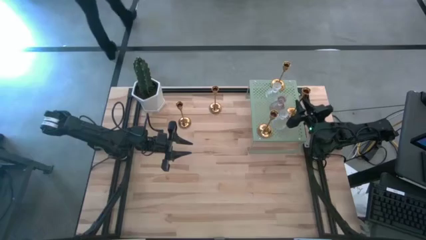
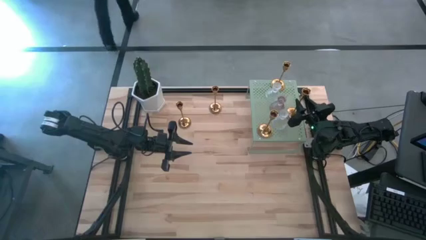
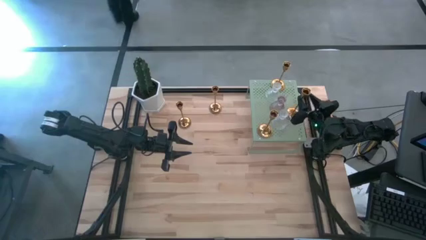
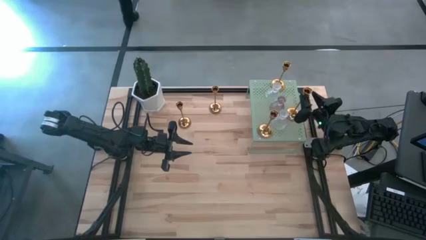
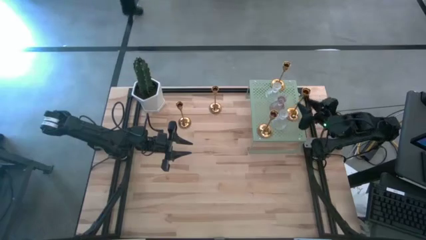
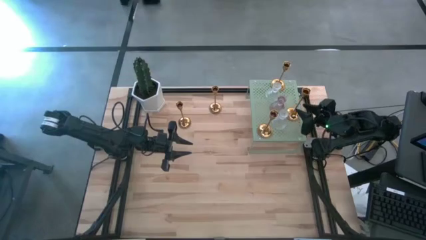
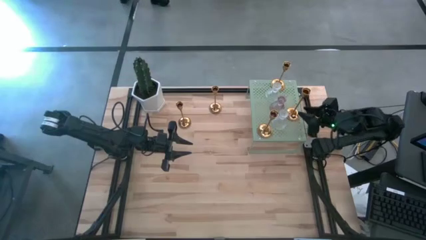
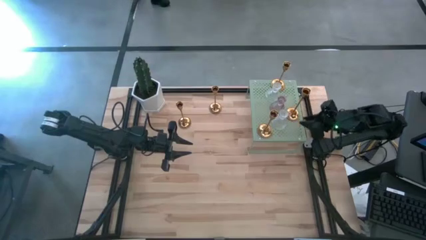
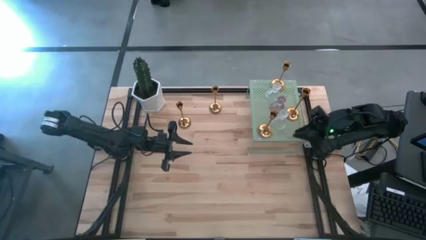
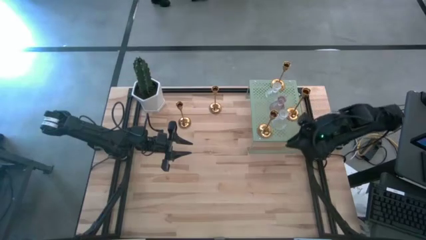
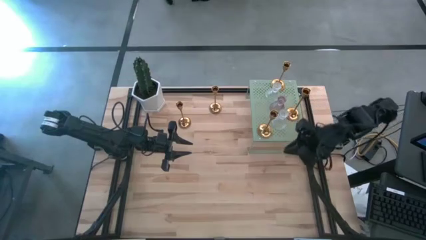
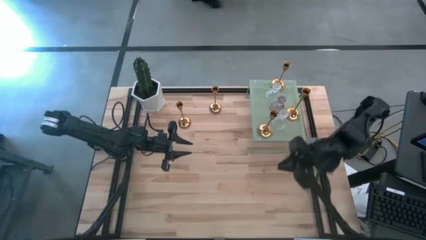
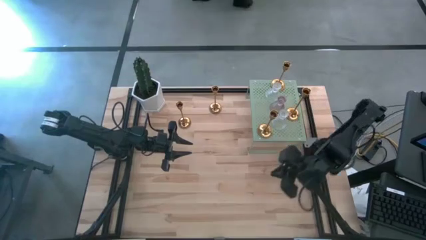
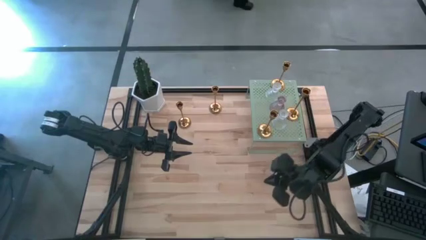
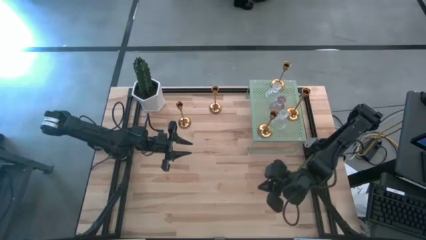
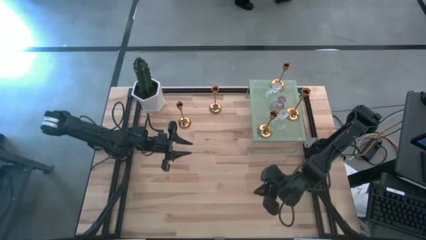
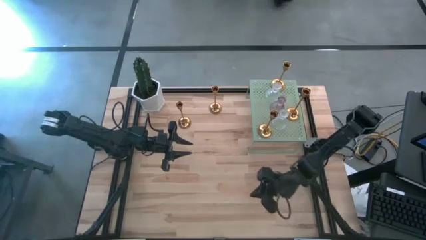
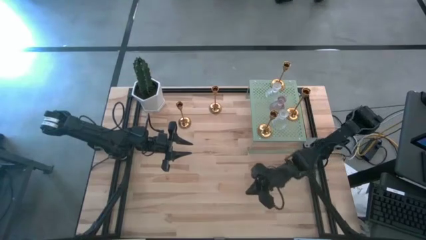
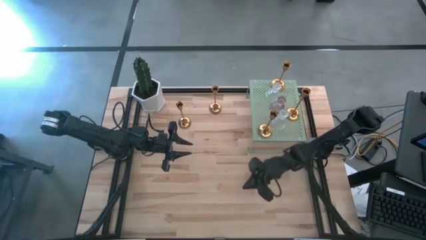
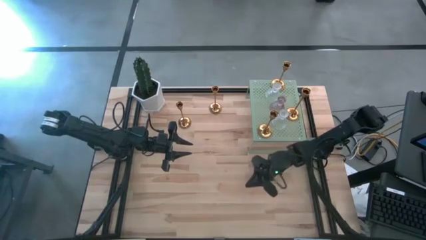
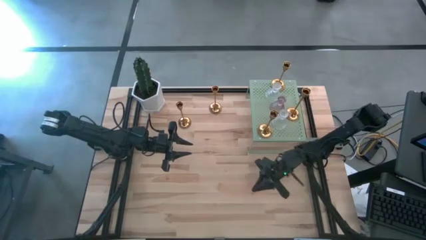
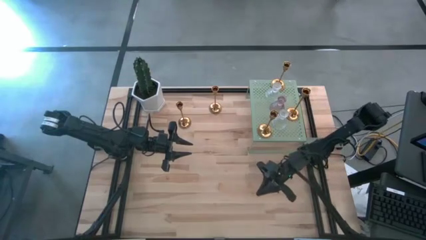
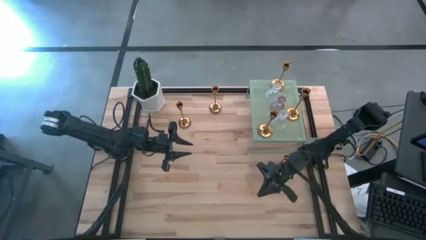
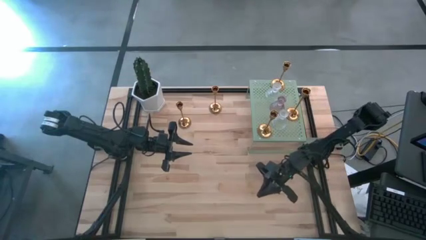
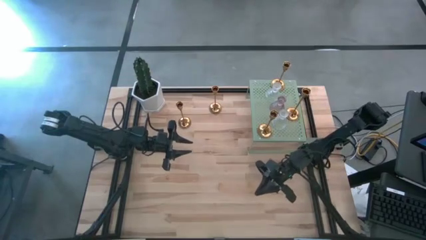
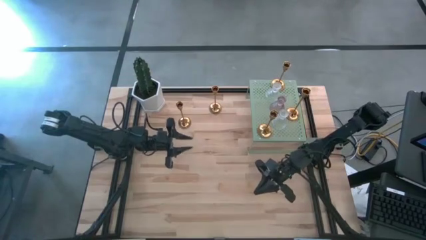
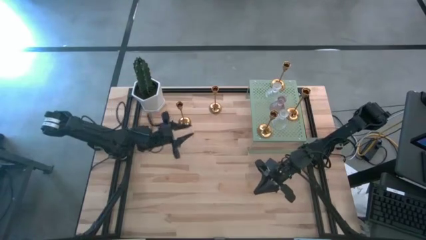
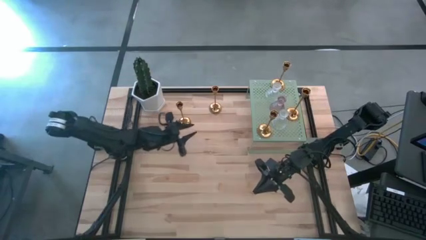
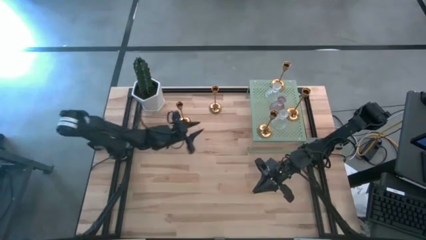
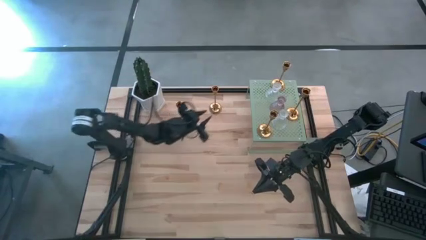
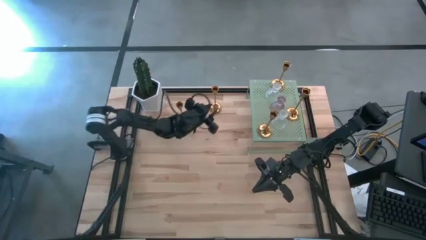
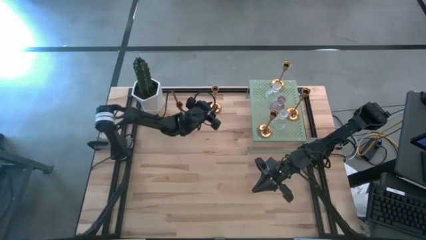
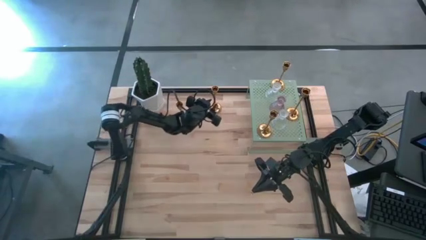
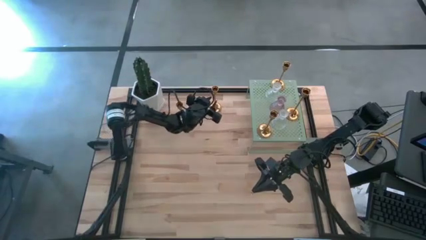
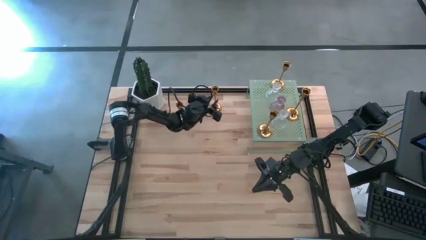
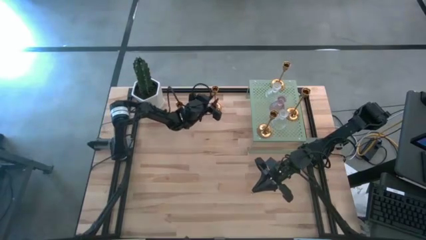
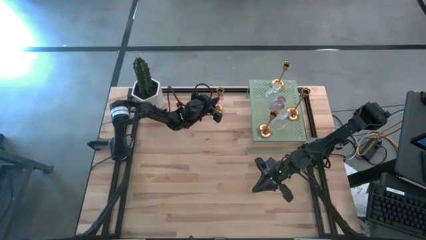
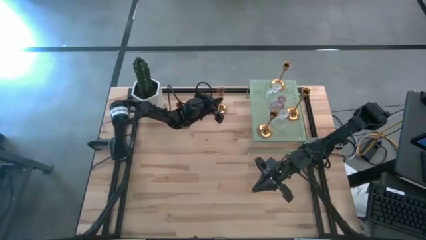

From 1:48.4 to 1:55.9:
Task: Pick & Place candle stick holders
Put the gold candle holder on the shelf

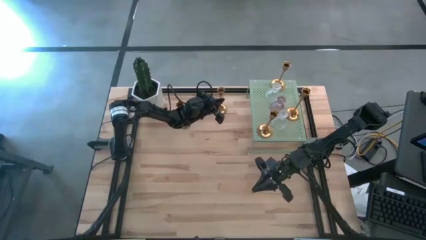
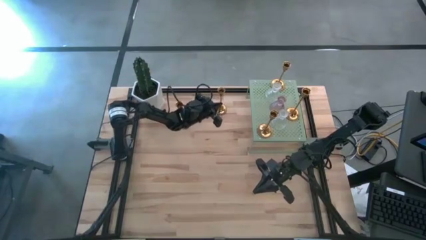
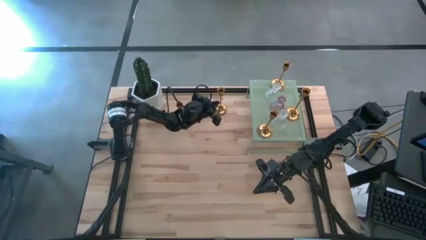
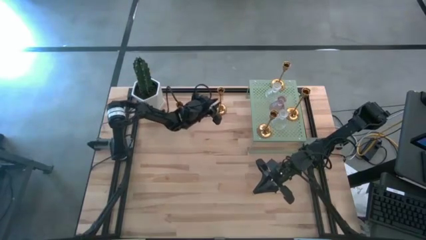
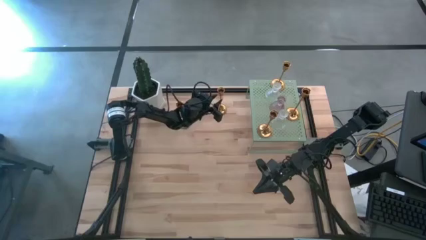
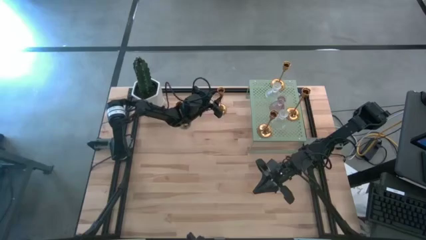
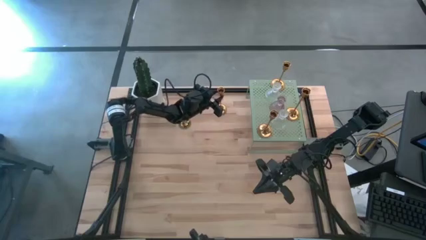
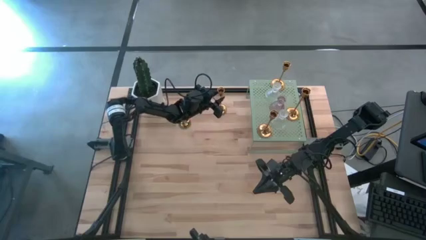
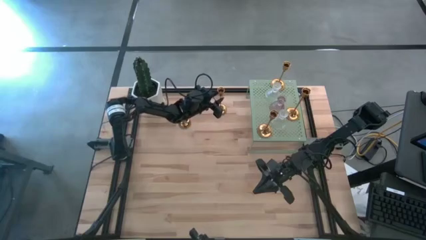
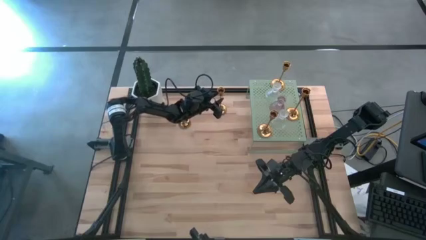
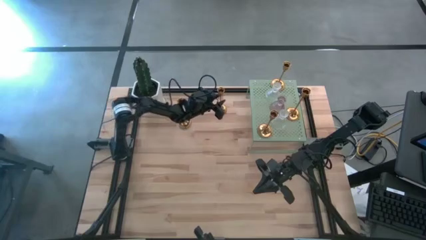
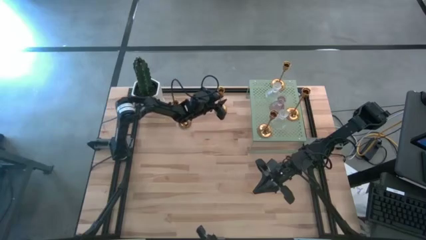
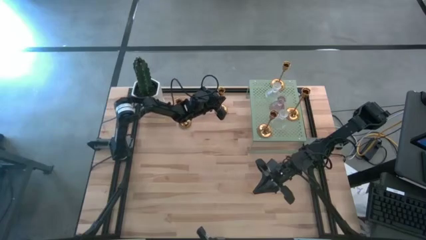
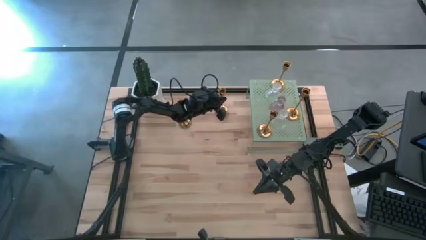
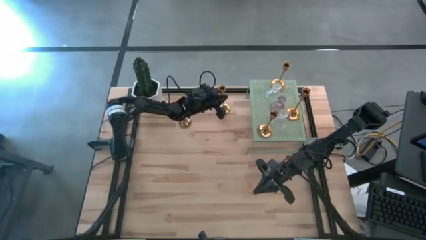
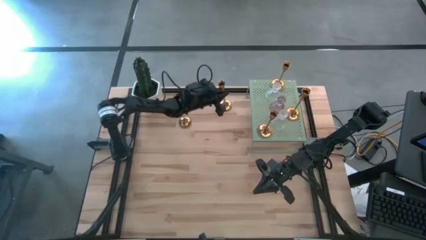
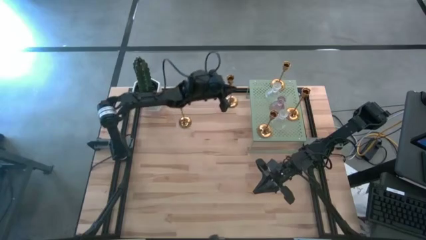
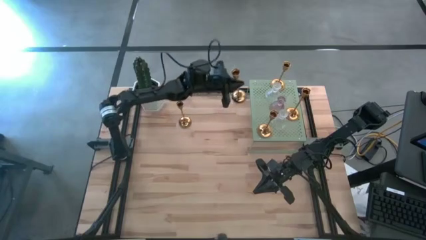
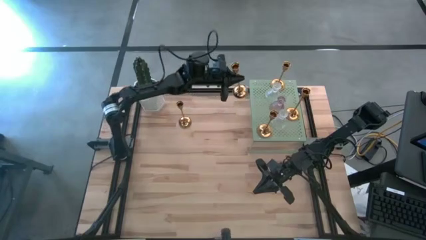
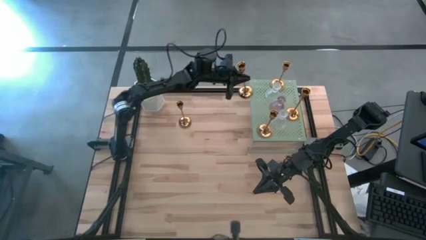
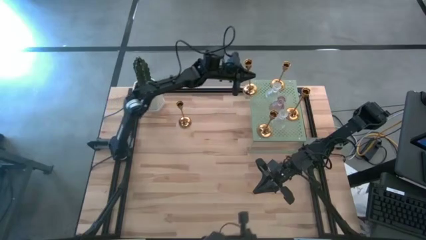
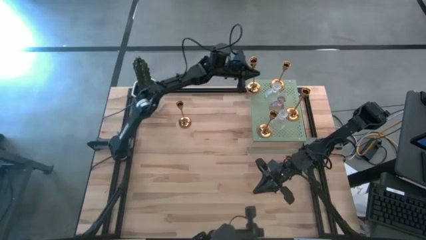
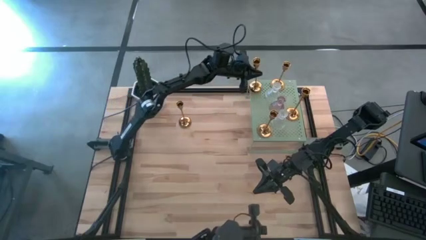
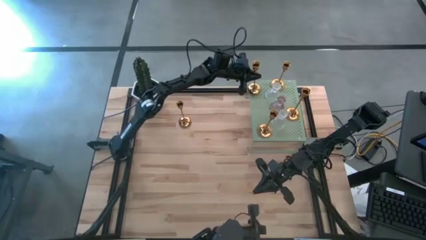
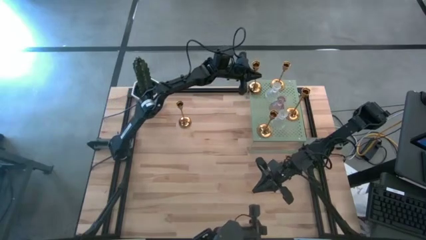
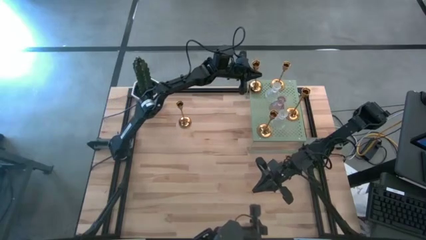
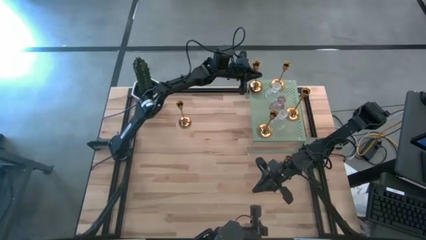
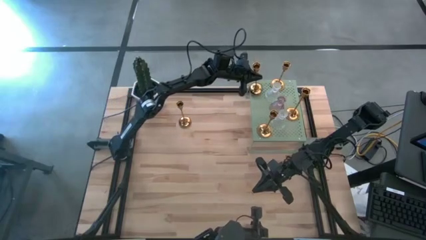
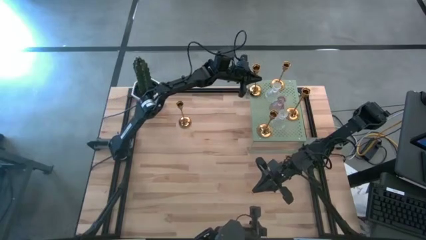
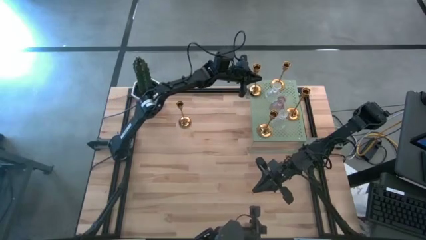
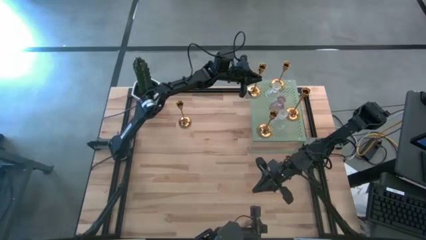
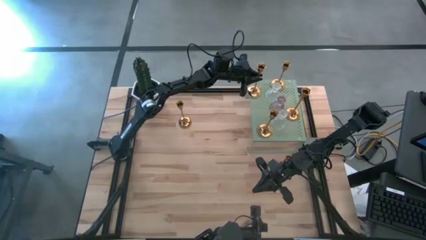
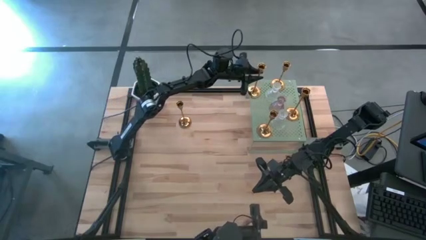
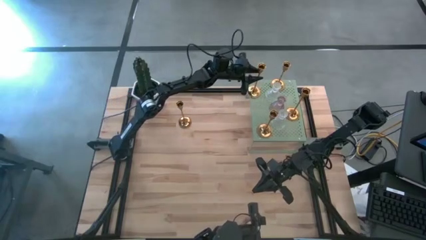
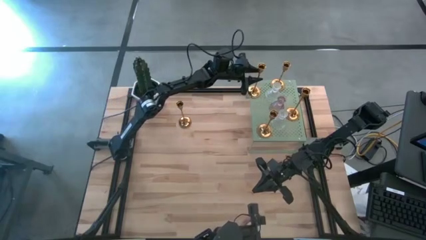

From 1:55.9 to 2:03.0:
Put the gold candle holder on the shelf

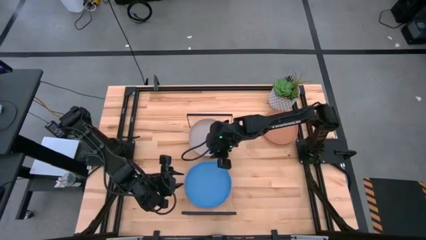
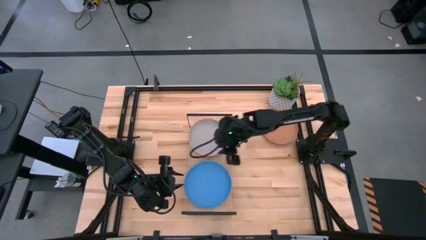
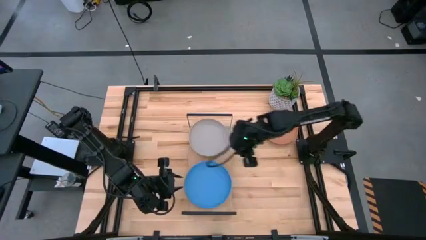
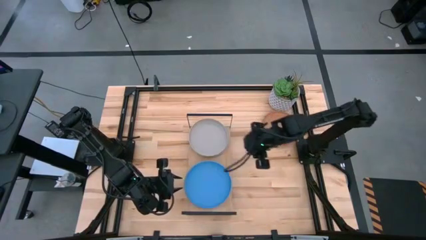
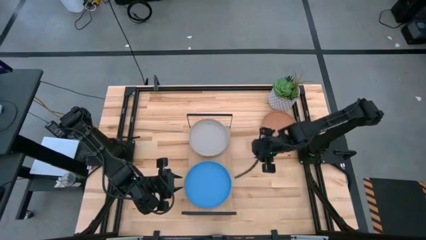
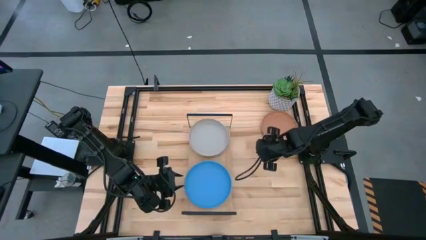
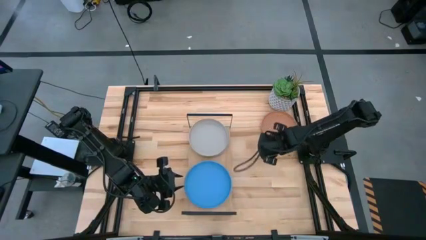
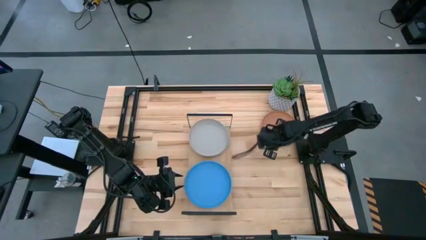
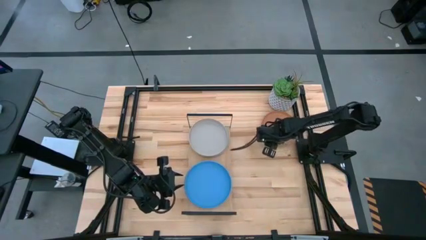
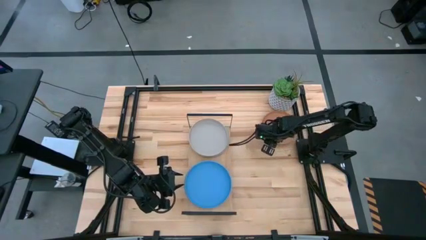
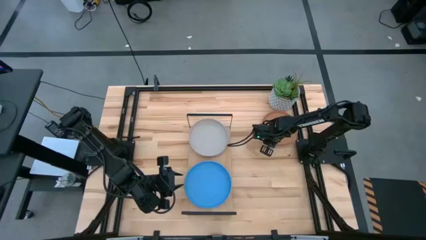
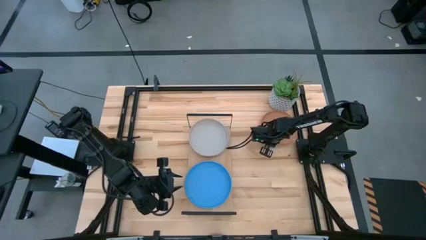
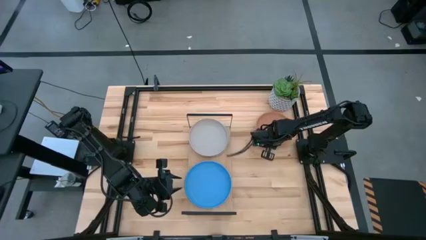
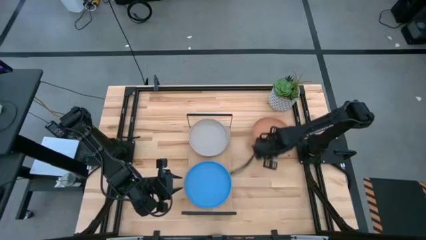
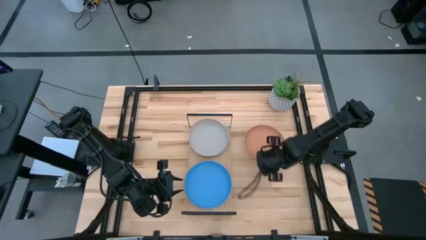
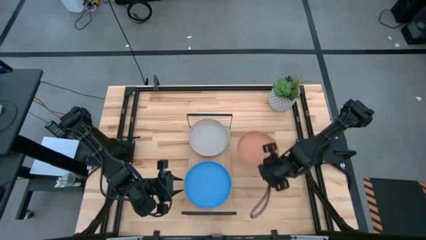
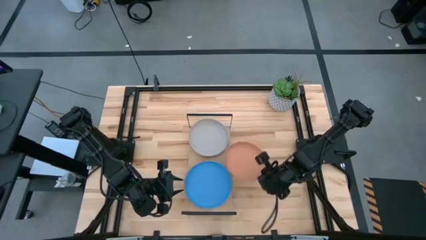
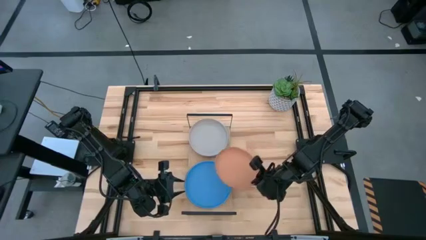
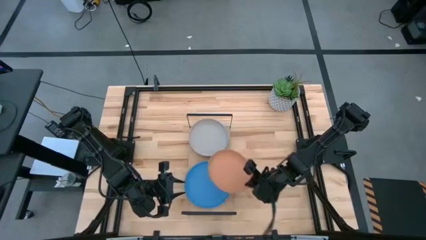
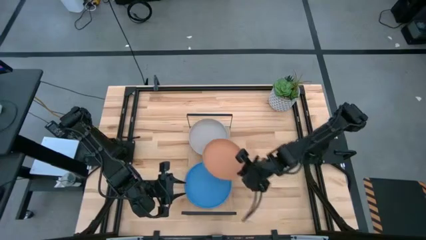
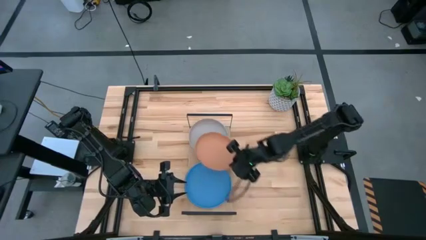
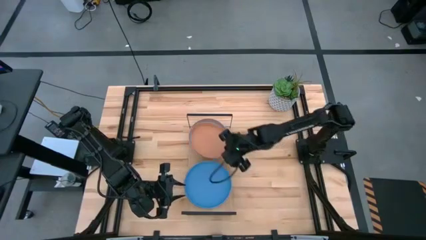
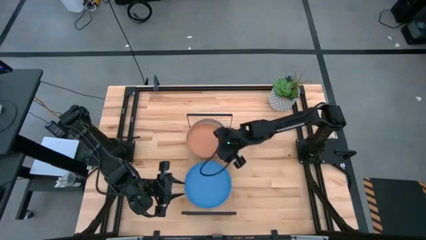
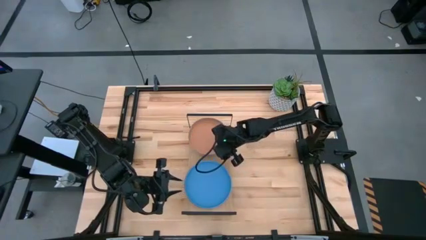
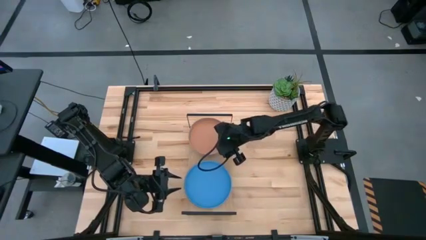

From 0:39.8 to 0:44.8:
Task: Place and stack plates onto a shelf
Stack the brown plate on top of the gray plate on the shelf
